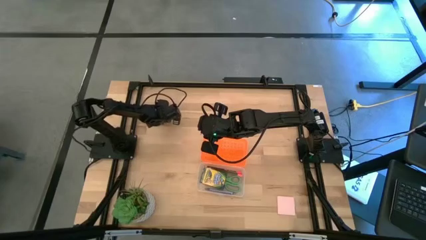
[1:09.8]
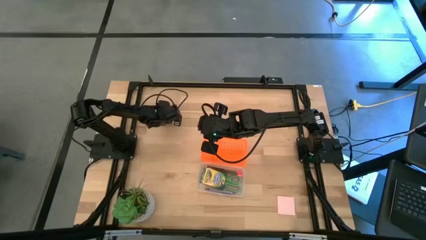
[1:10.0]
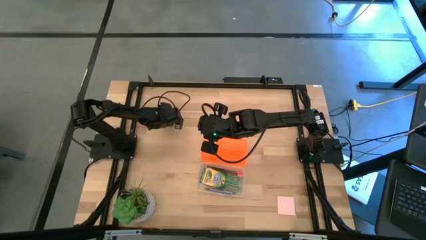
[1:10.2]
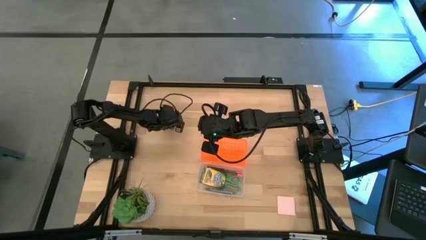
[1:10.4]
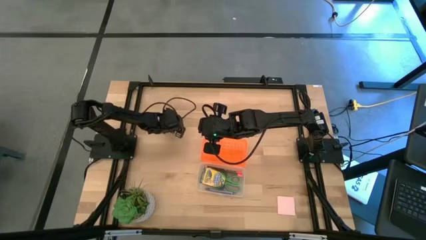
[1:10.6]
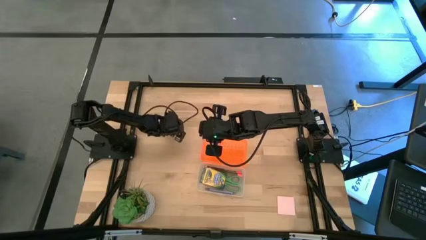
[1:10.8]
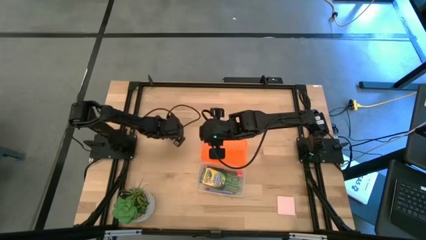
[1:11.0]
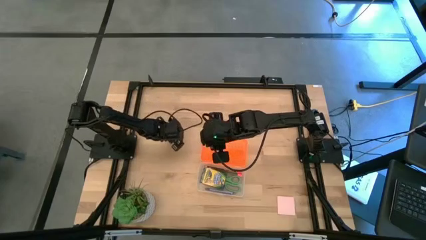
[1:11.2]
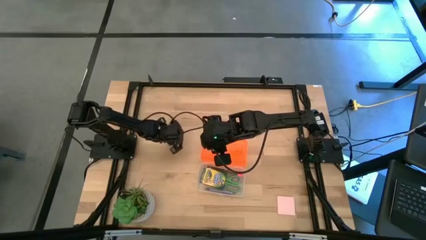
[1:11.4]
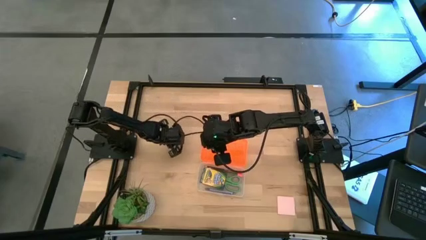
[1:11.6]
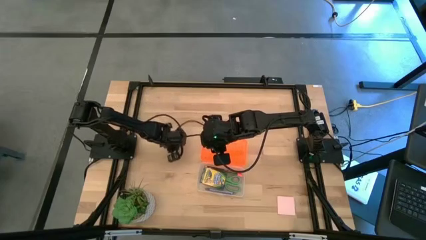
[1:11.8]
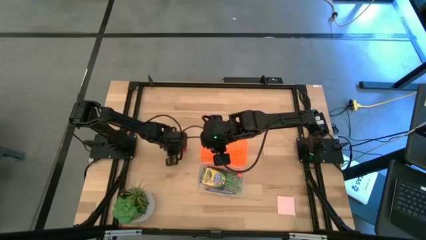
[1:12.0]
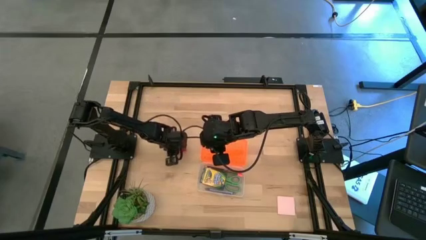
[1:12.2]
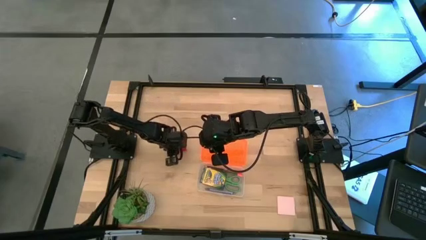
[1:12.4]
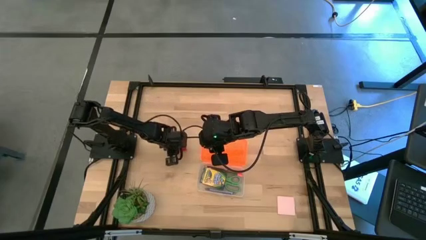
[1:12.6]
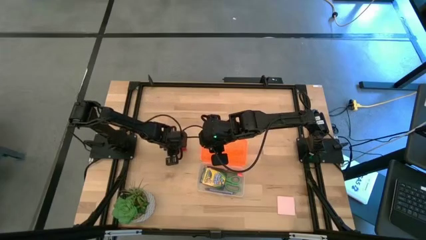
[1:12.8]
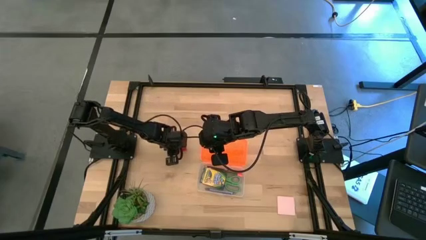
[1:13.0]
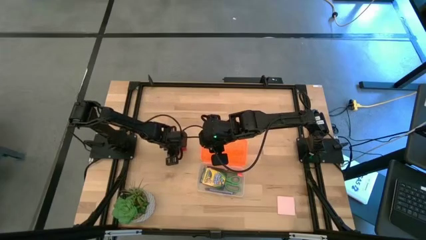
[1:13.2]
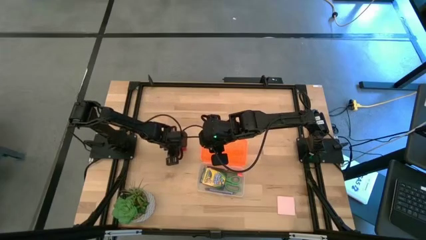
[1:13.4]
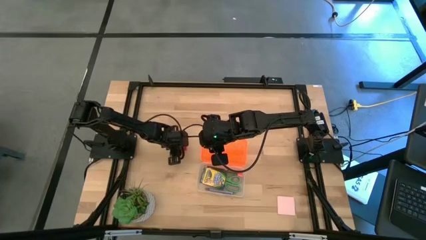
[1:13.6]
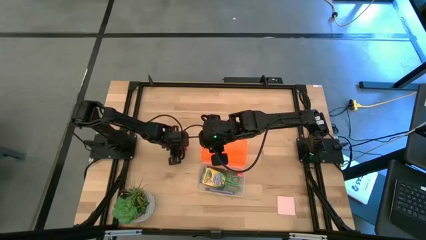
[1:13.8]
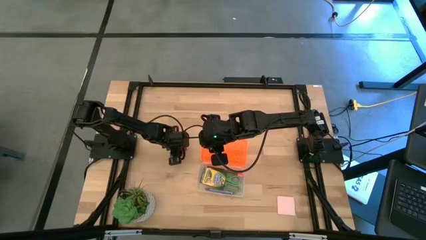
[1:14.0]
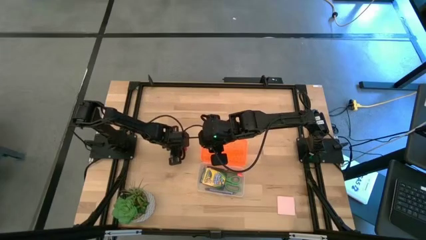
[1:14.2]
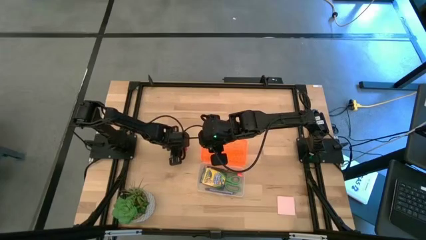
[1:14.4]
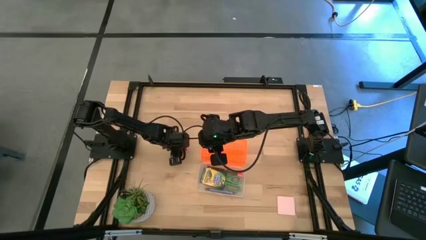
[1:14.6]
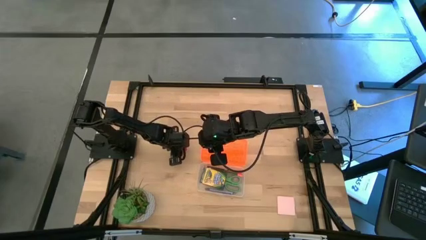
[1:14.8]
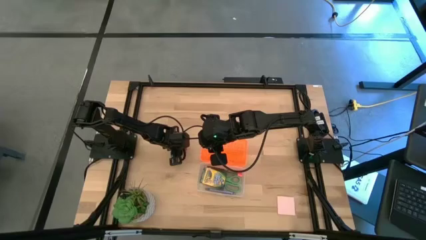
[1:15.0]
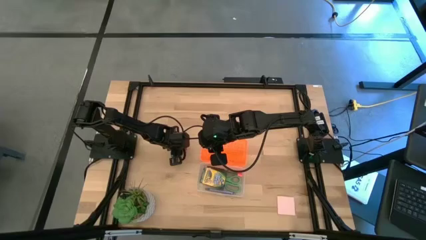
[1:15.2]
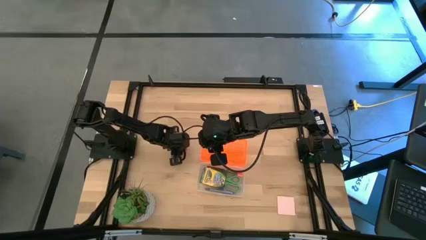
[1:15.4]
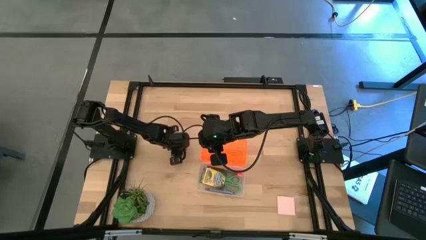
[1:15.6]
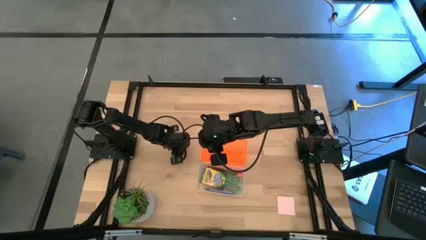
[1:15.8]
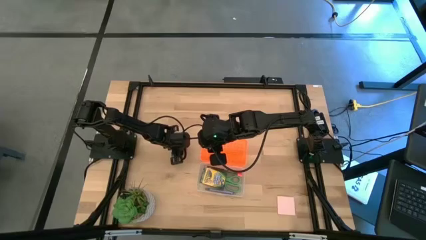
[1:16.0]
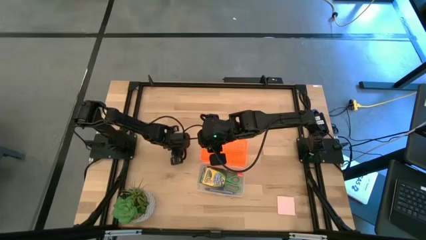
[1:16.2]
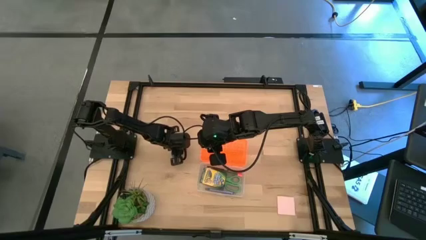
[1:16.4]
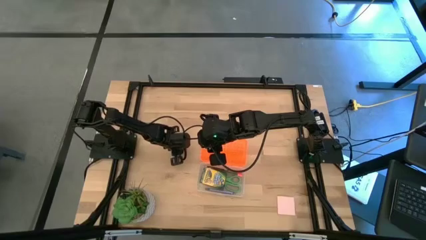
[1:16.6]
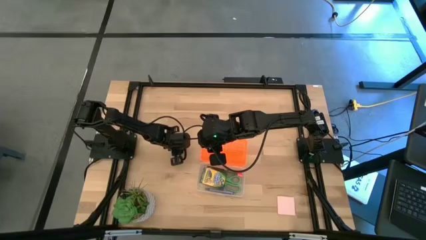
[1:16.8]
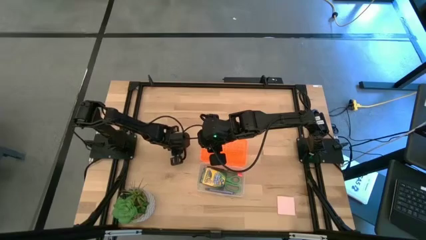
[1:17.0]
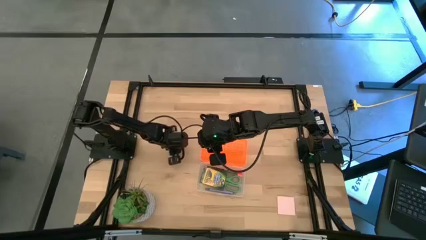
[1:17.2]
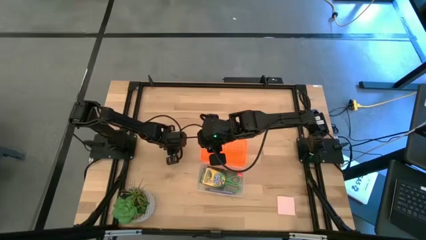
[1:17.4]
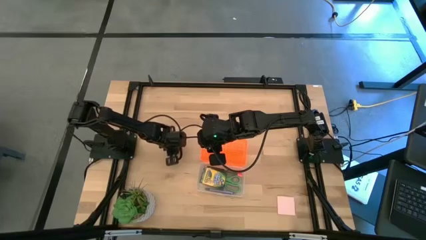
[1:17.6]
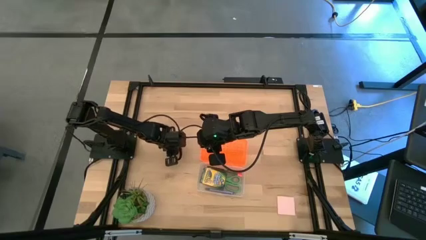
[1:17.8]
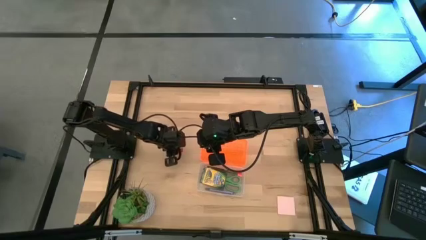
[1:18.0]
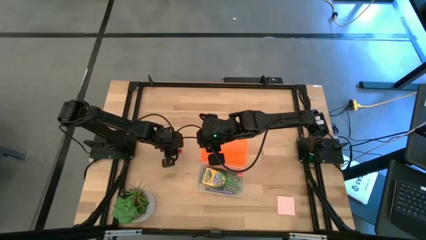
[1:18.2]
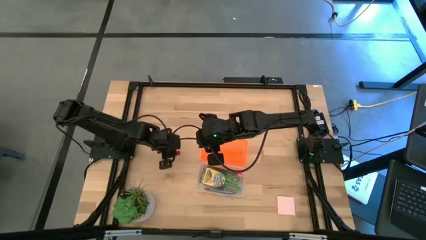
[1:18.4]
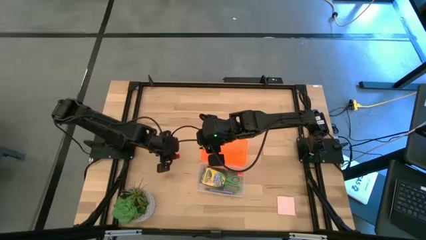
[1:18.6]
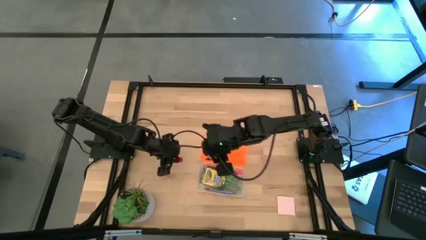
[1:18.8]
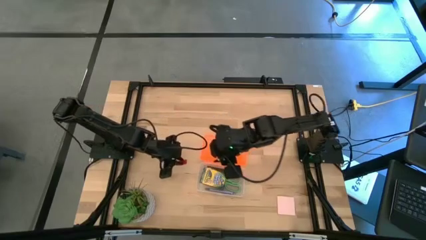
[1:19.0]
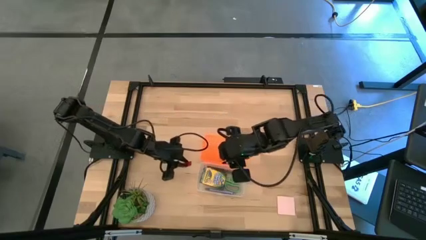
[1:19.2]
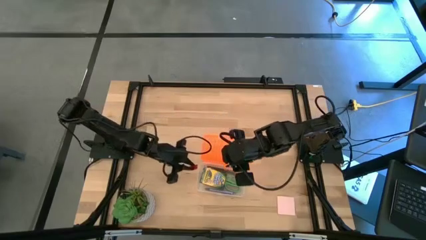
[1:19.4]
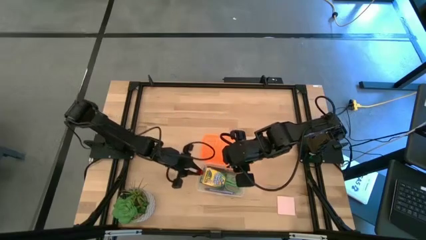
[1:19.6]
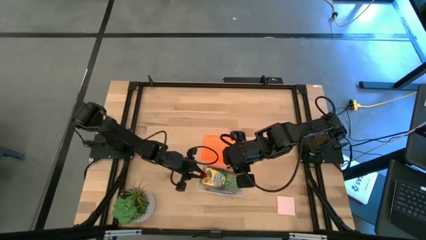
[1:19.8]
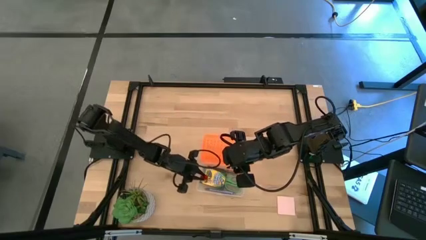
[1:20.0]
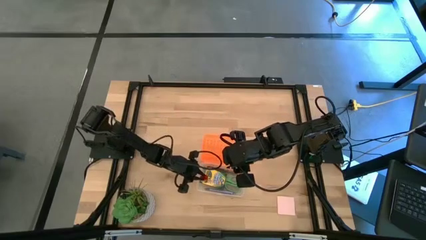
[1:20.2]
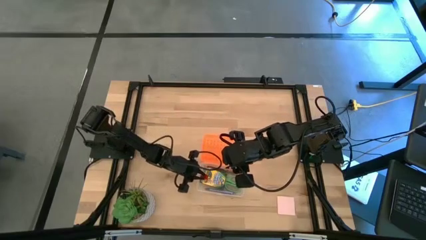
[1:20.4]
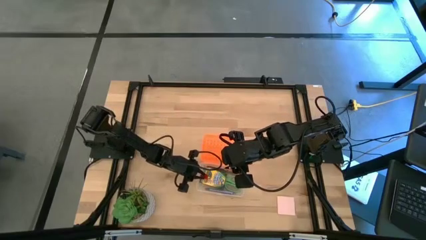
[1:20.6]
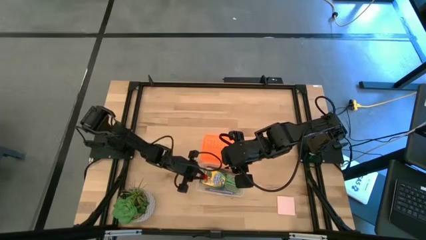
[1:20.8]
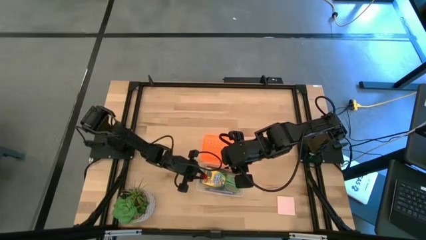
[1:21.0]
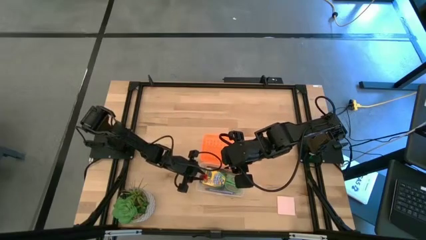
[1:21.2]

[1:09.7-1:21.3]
Task: Pack school essentials
Put the red eraser into the orange supply box
